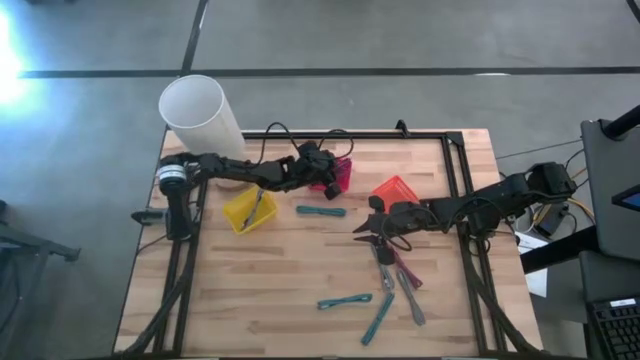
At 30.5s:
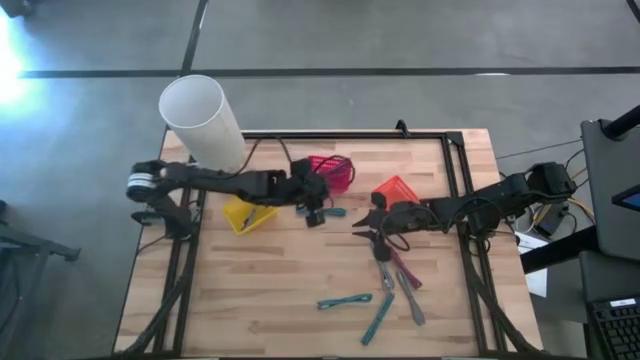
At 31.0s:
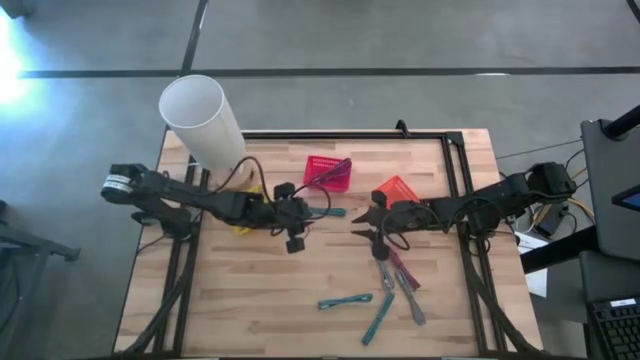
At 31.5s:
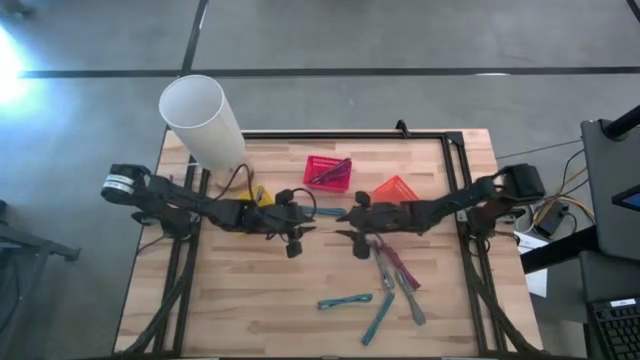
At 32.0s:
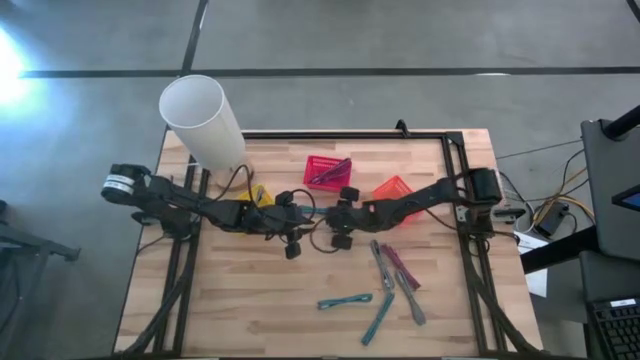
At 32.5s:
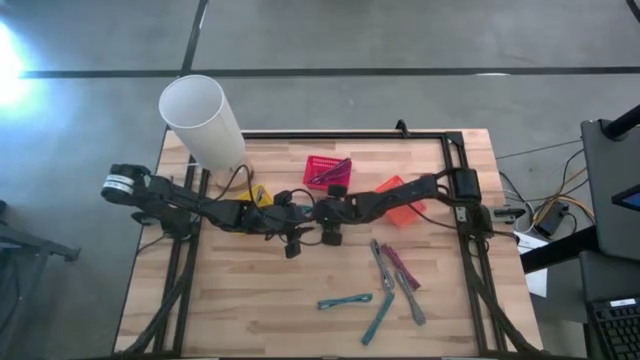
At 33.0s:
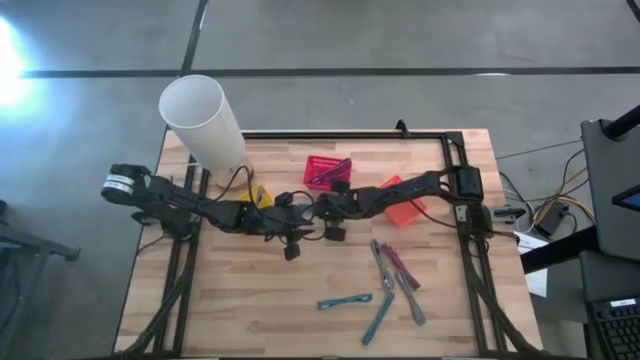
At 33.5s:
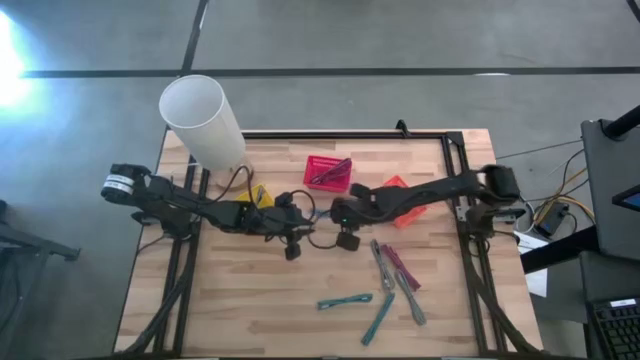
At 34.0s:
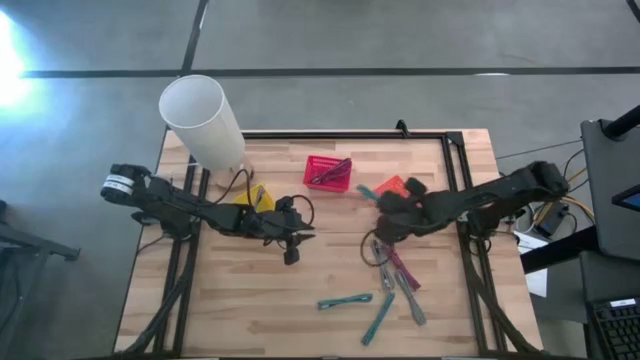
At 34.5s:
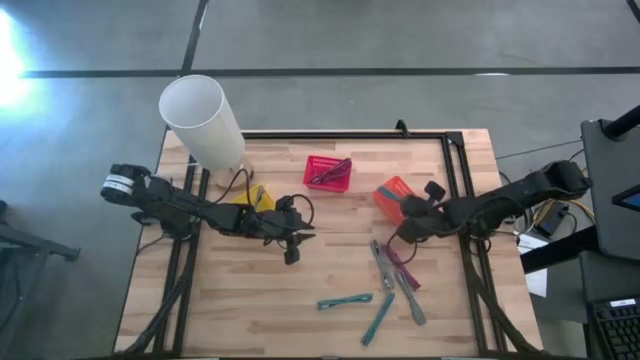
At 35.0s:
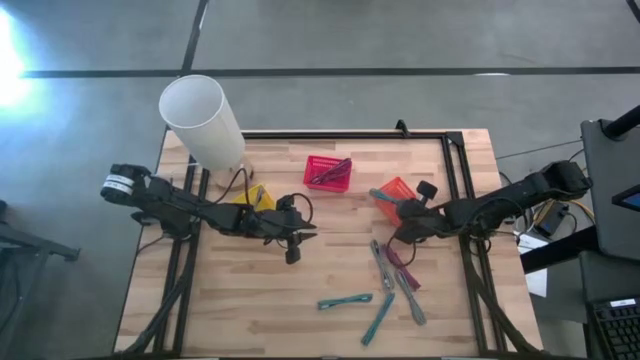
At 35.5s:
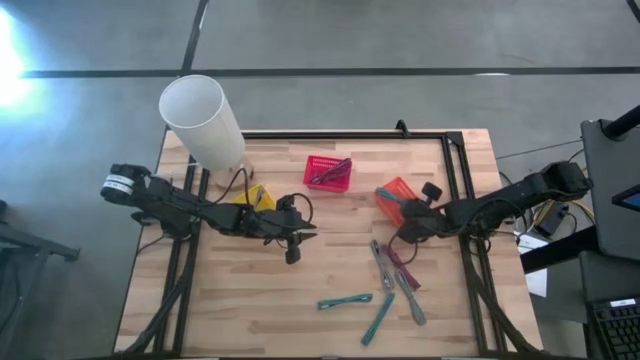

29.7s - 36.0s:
Task: Pick & Place USB Port
Put the top left blue charger cable into the orange bin

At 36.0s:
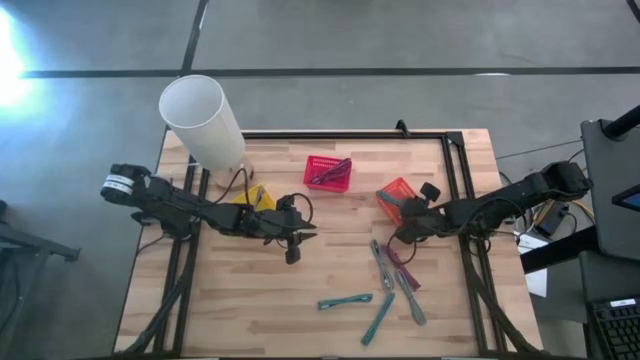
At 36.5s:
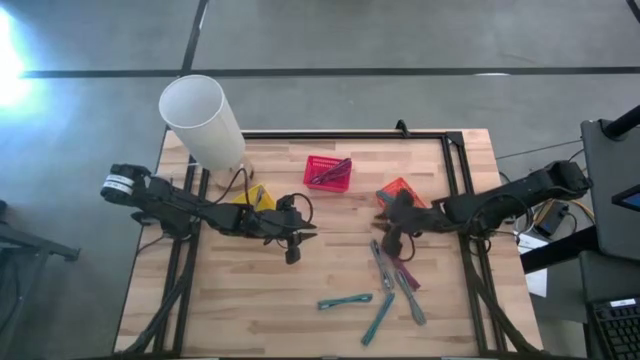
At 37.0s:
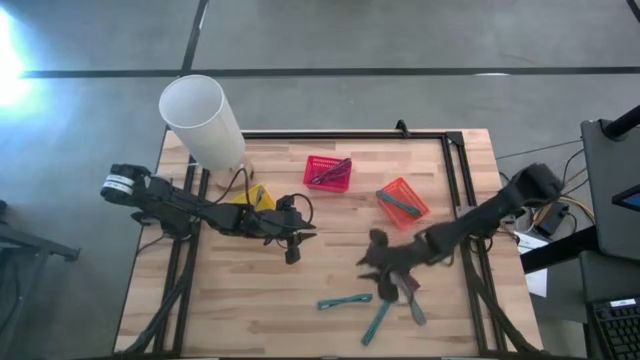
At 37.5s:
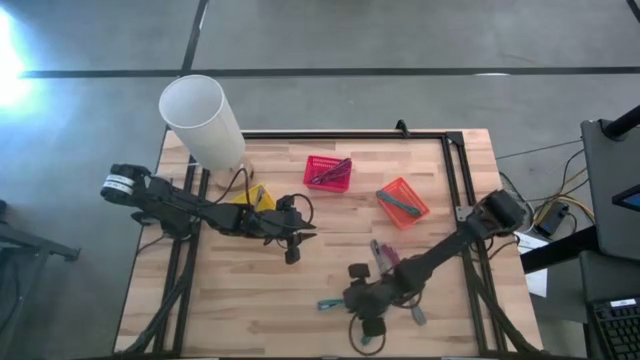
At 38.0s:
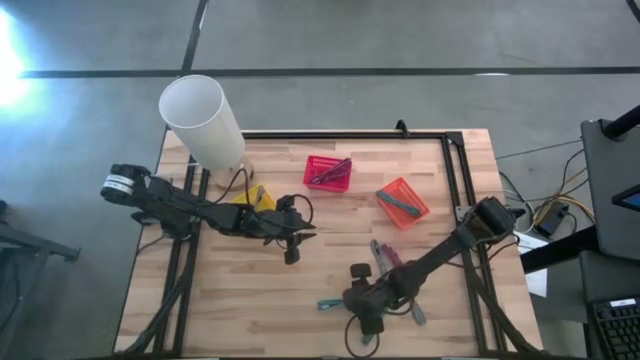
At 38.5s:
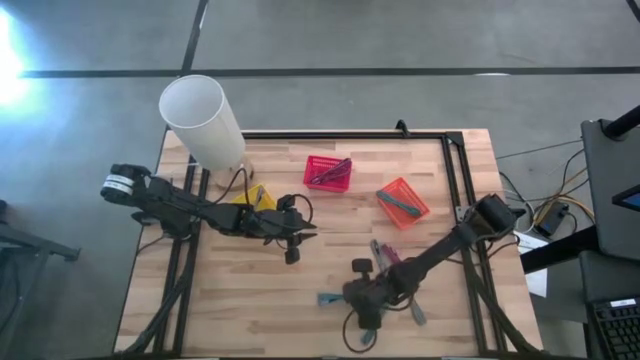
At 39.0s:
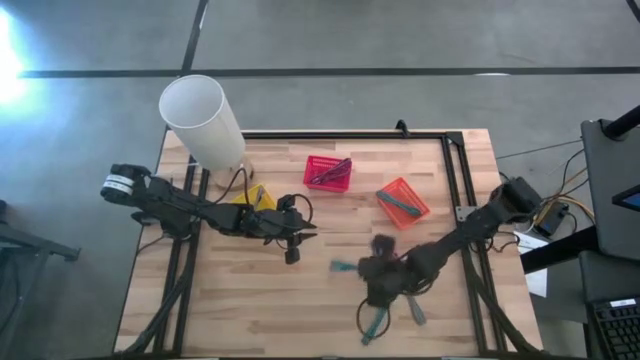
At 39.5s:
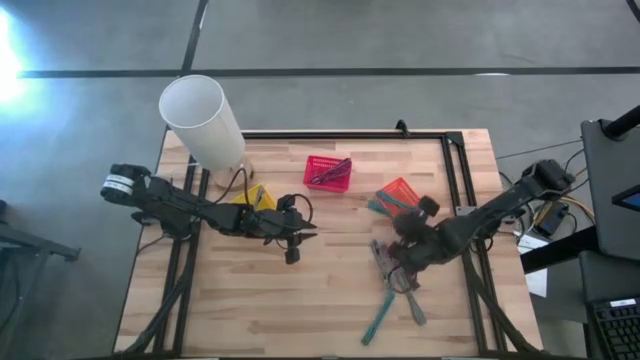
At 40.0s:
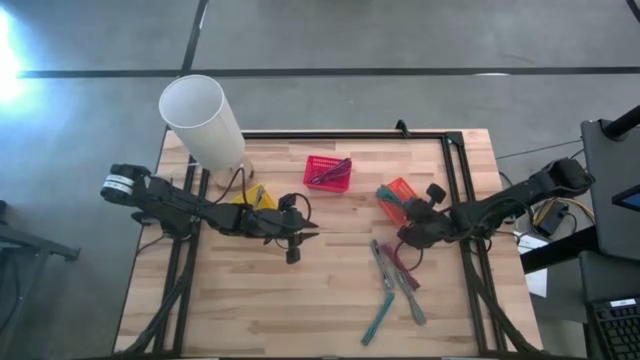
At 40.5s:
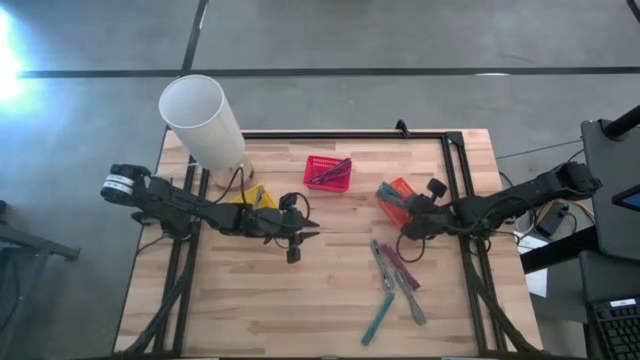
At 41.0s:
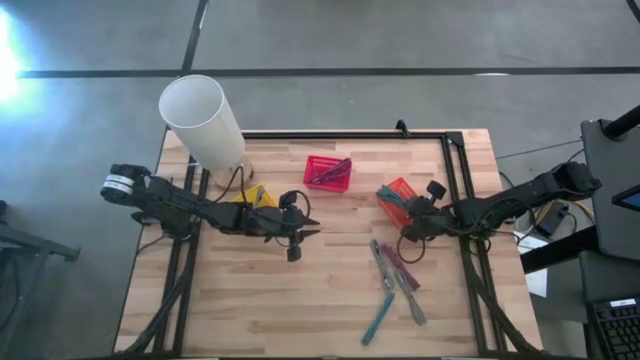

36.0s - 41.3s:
Put the left blue charger cable into the orange bin

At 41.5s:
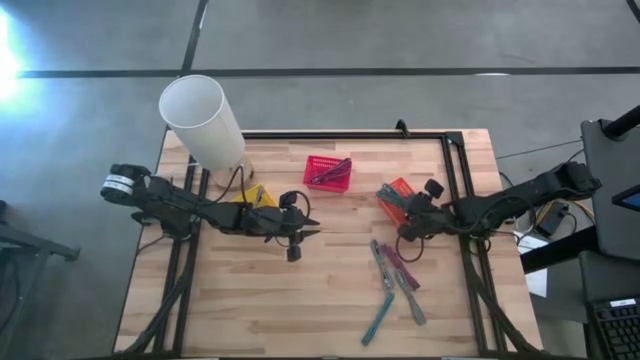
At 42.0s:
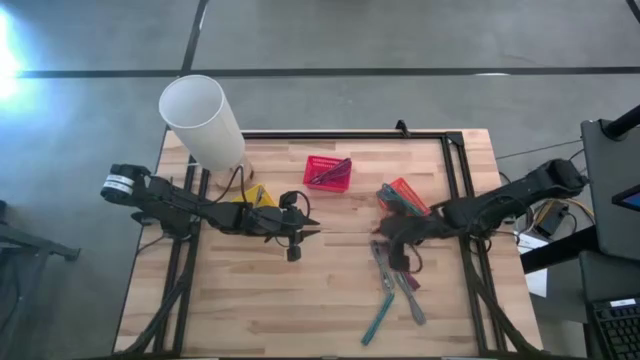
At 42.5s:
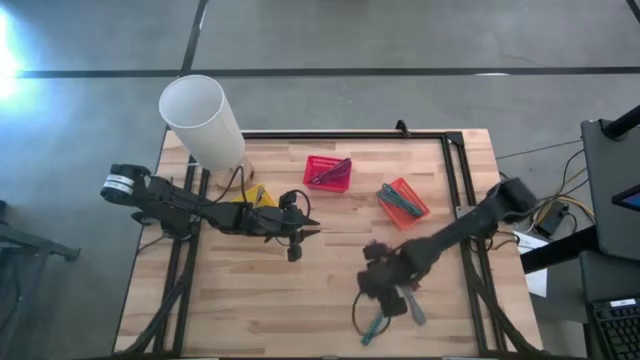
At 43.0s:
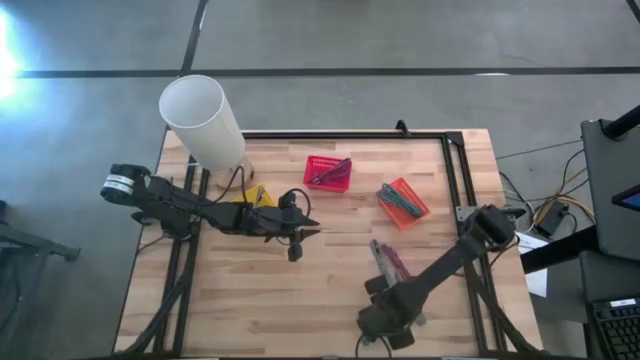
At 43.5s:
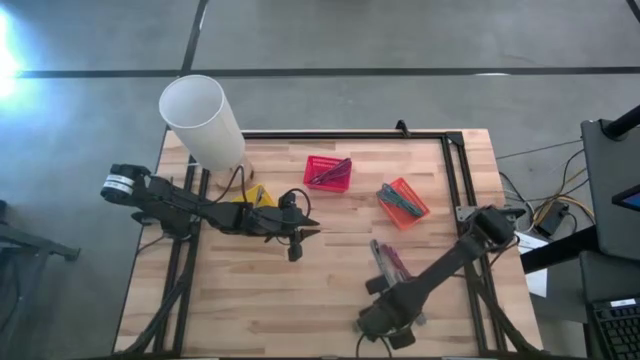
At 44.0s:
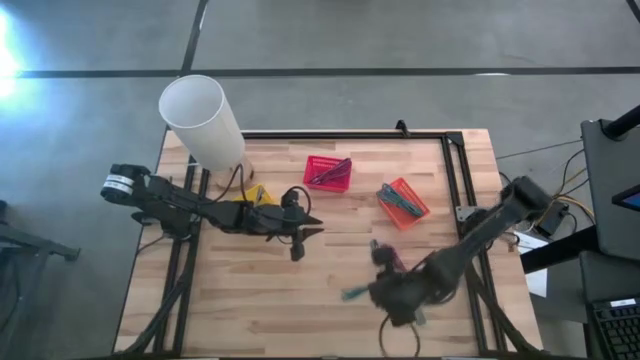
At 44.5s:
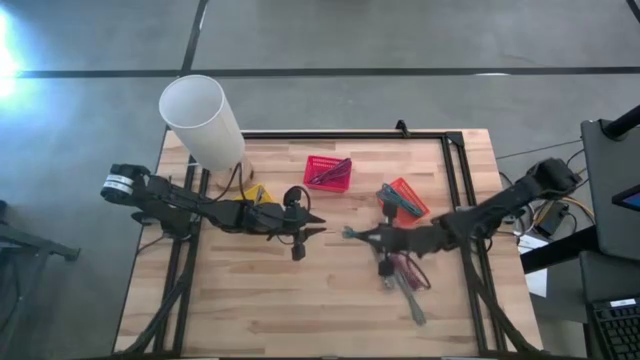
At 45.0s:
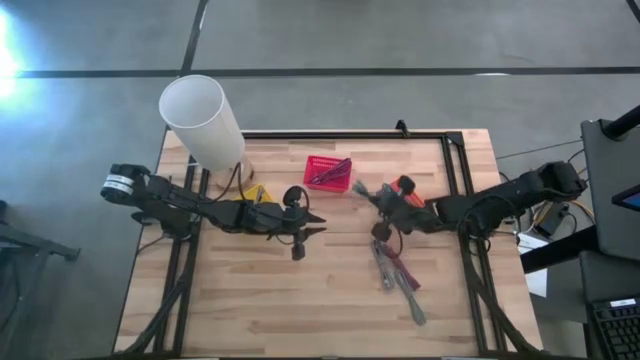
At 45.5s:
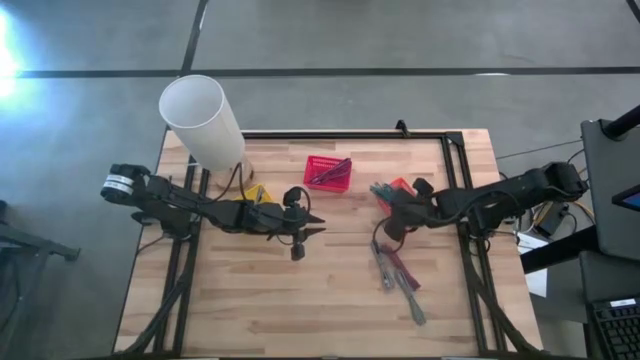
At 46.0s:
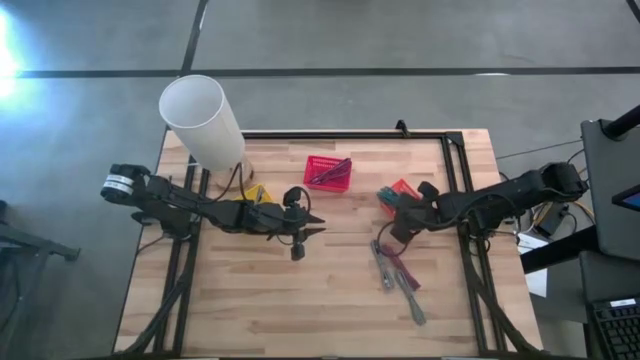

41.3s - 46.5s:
Put the blue charger cable into the orange bin

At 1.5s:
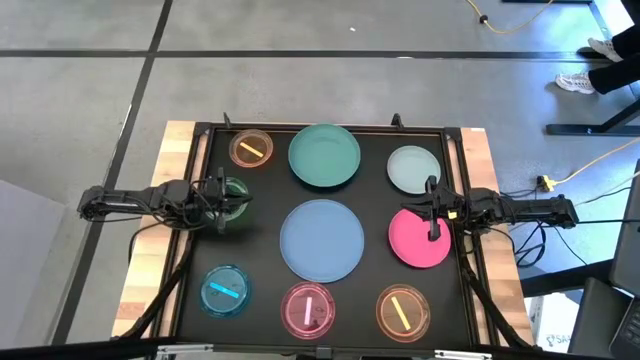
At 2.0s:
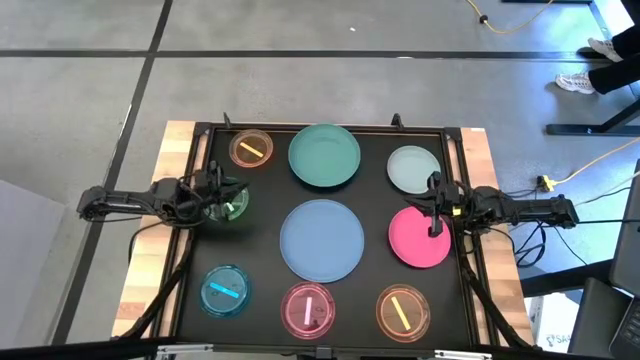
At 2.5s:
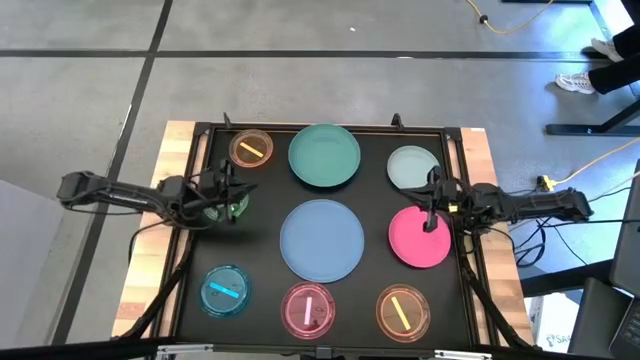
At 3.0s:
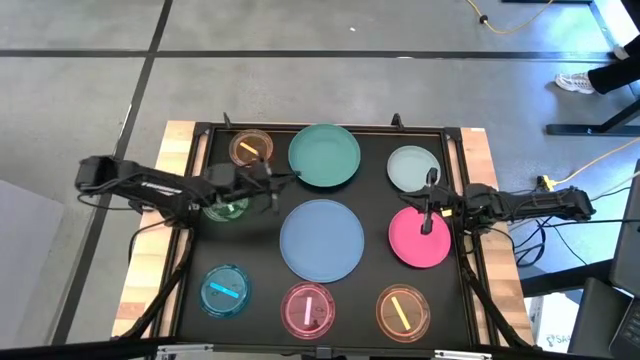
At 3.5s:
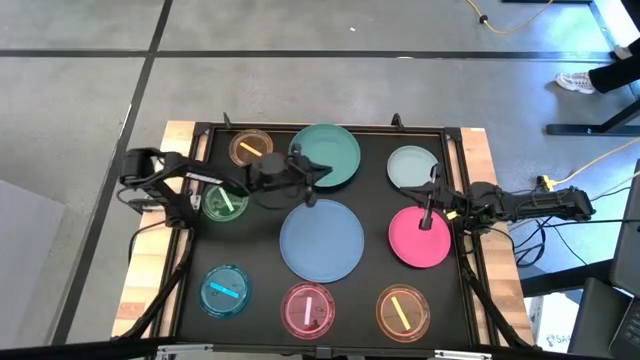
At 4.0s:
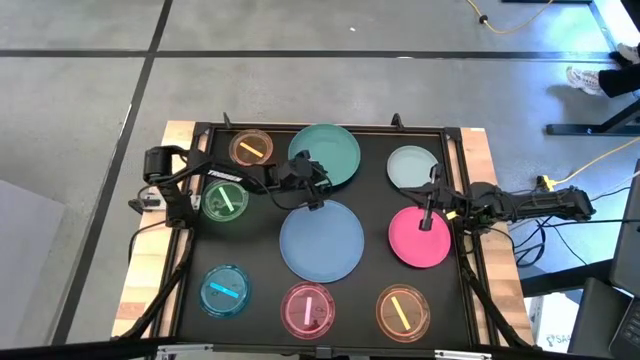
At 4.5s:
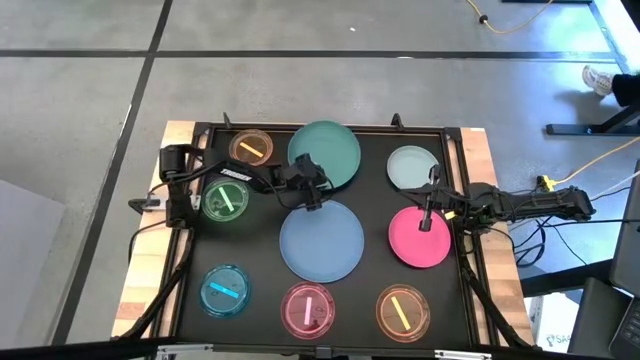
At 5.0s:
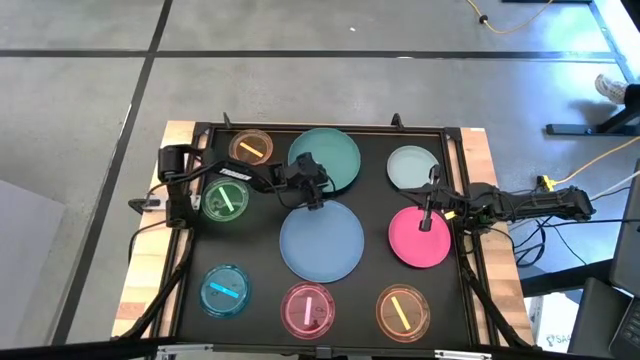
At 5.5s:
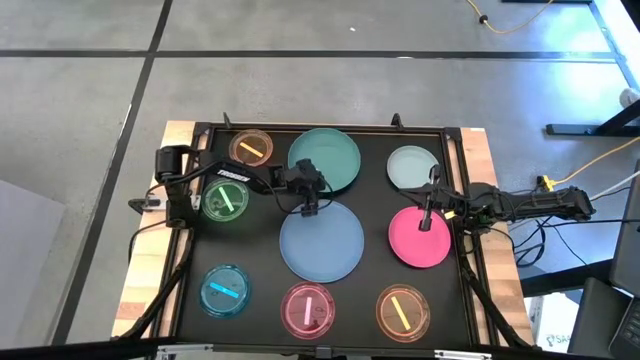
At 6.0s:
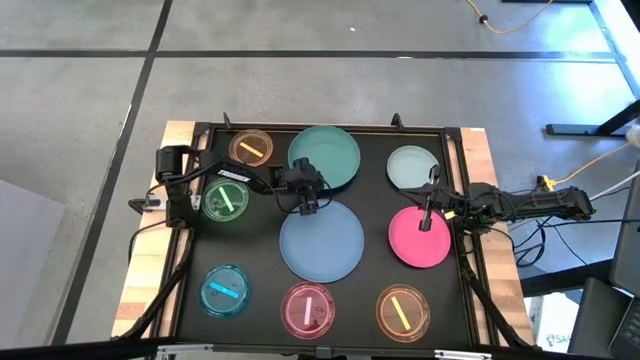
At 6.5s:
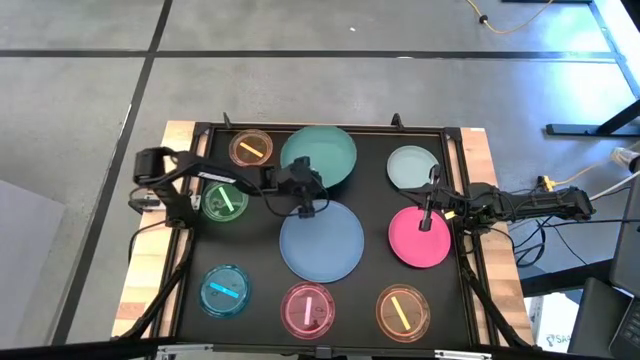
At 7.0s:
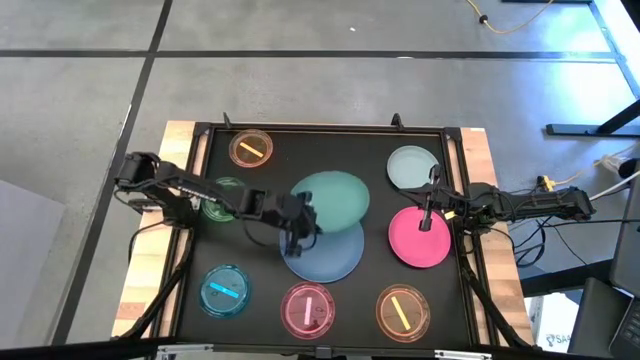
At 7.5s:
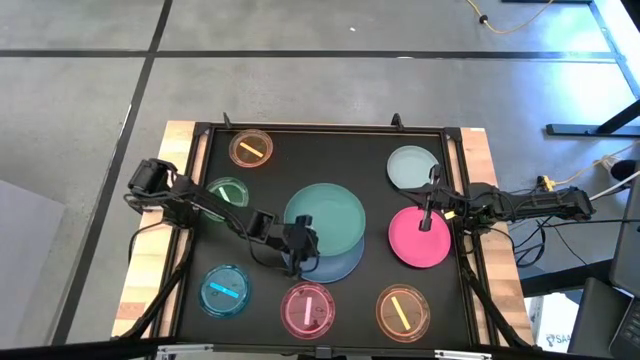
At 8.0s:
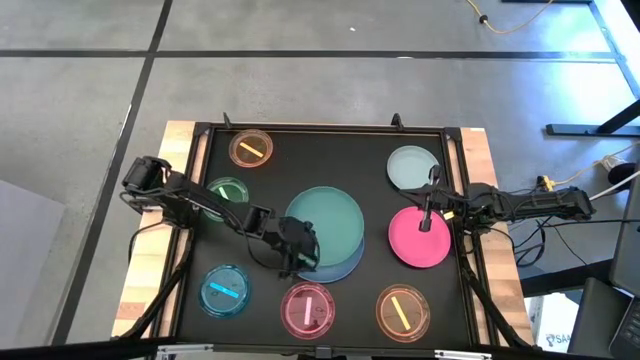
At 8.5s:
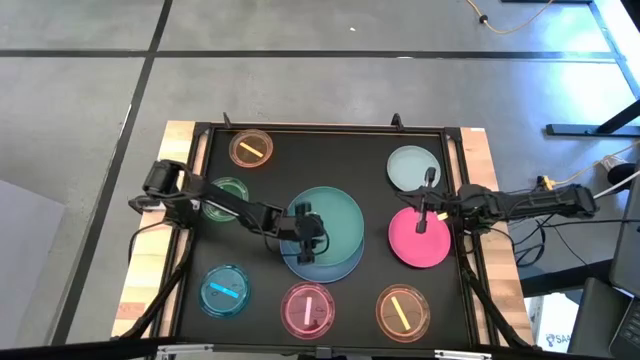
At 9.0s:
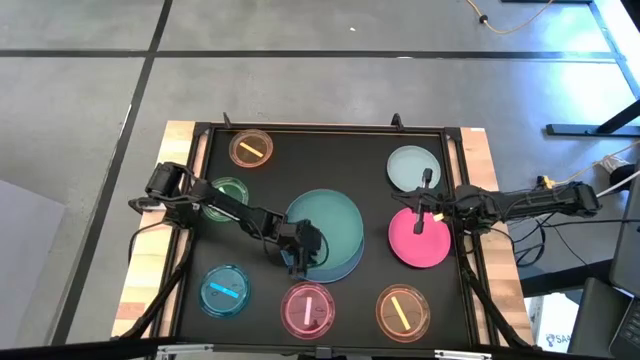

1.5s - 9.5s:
Task: Stack plastic plates
Stack the big green plate on the big blue plate
